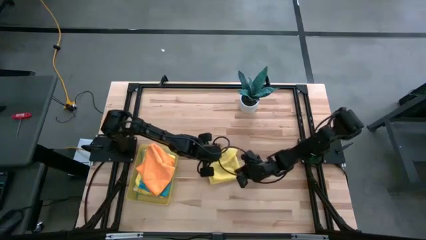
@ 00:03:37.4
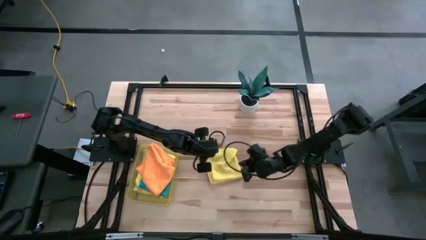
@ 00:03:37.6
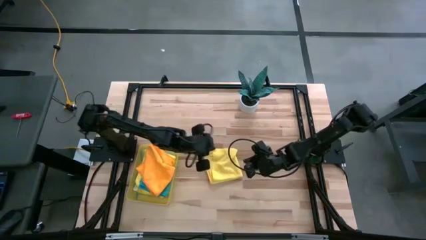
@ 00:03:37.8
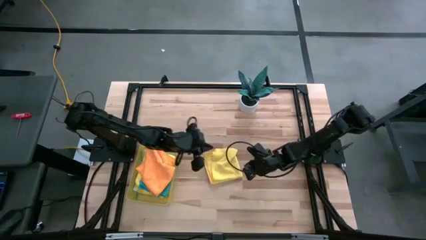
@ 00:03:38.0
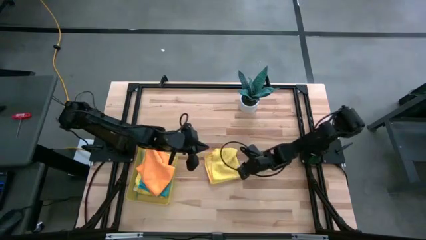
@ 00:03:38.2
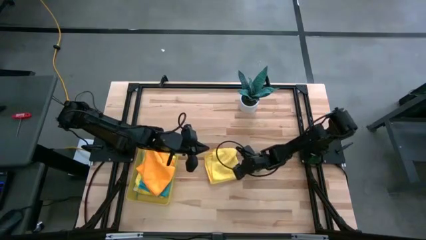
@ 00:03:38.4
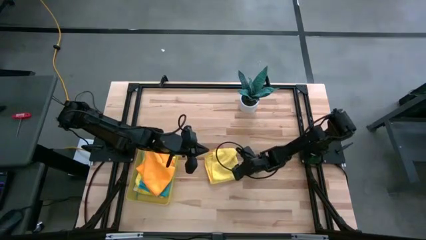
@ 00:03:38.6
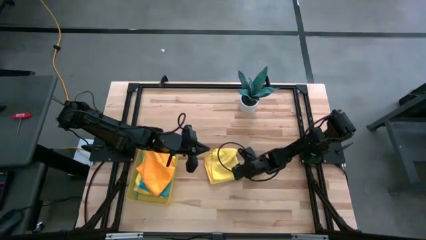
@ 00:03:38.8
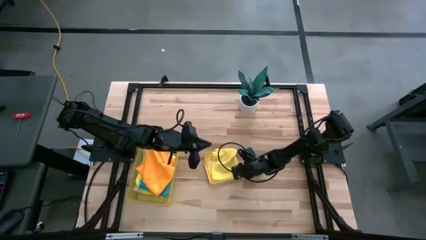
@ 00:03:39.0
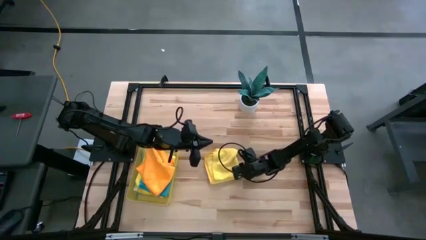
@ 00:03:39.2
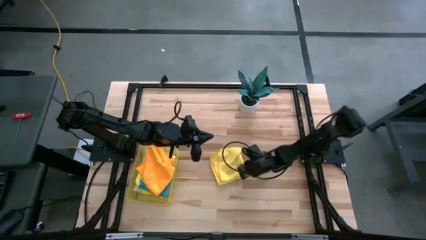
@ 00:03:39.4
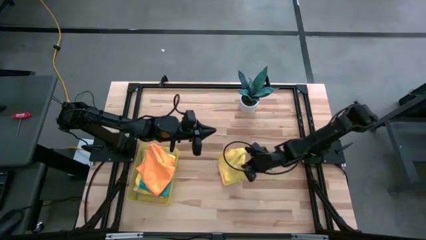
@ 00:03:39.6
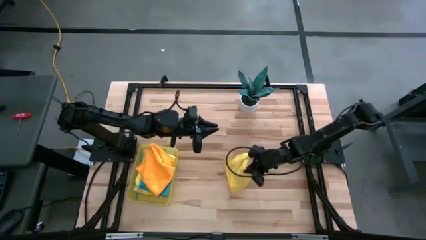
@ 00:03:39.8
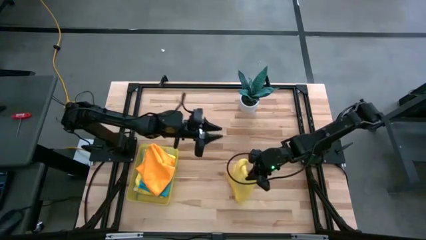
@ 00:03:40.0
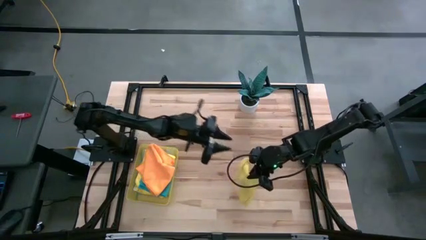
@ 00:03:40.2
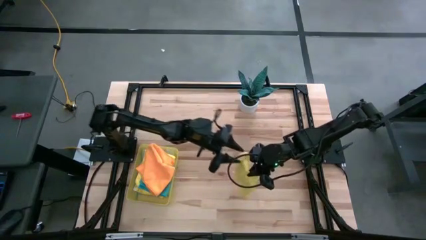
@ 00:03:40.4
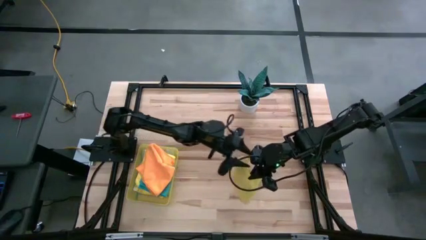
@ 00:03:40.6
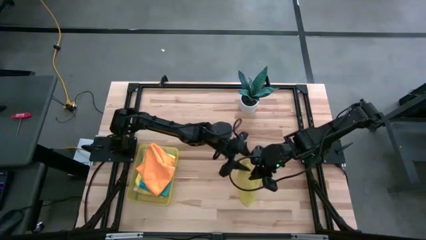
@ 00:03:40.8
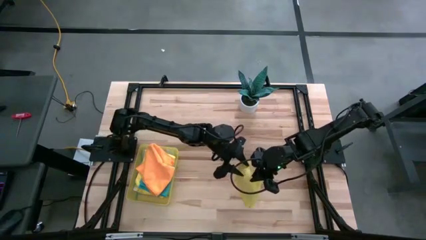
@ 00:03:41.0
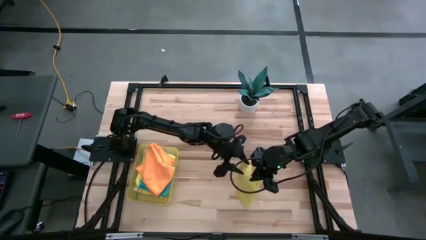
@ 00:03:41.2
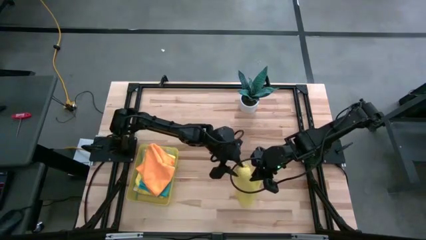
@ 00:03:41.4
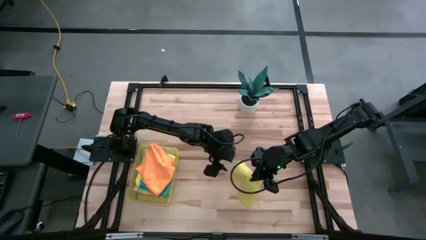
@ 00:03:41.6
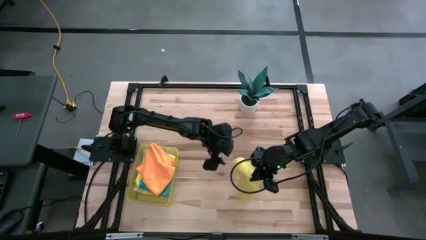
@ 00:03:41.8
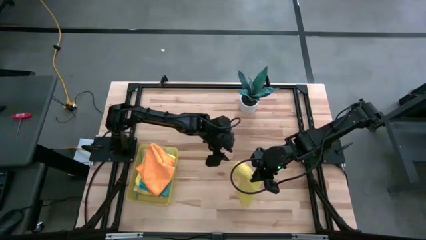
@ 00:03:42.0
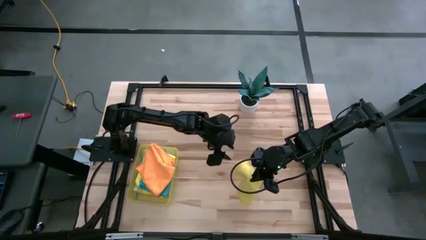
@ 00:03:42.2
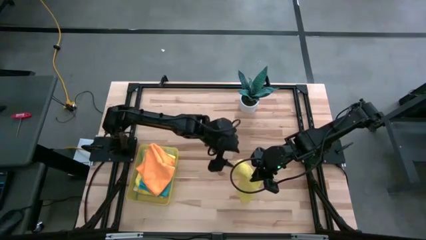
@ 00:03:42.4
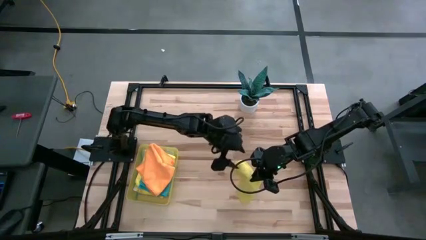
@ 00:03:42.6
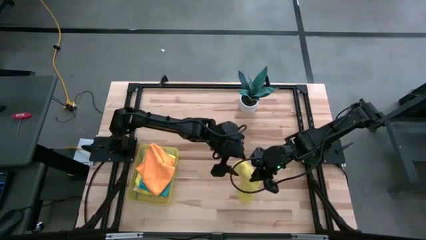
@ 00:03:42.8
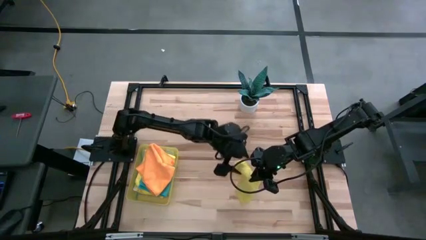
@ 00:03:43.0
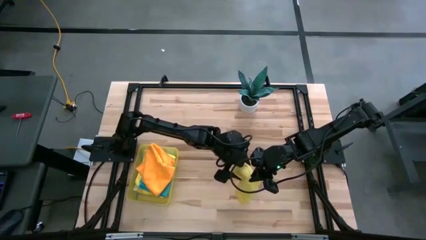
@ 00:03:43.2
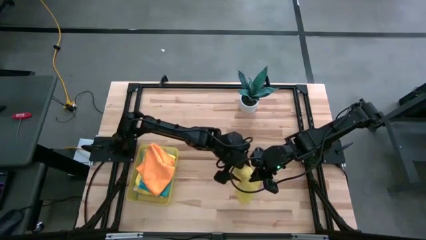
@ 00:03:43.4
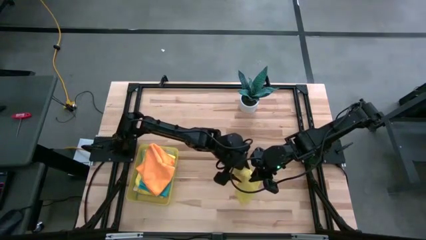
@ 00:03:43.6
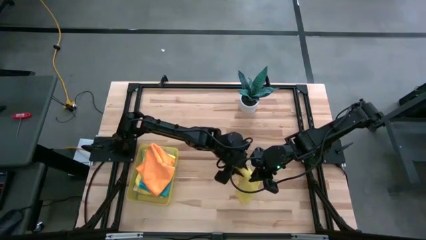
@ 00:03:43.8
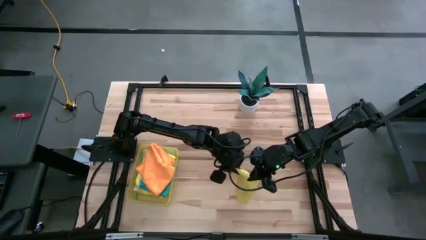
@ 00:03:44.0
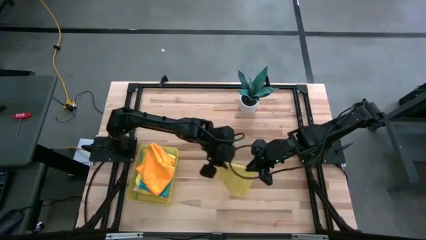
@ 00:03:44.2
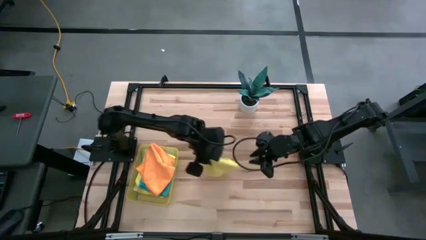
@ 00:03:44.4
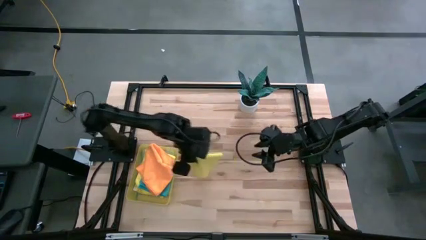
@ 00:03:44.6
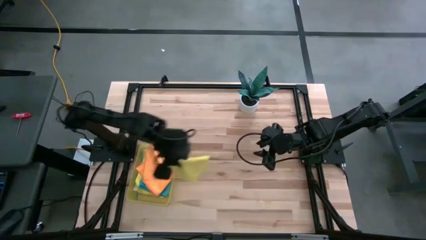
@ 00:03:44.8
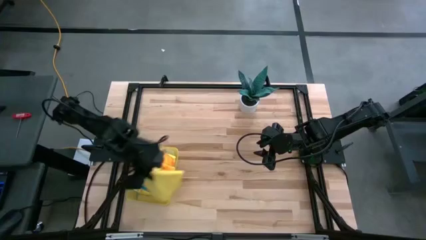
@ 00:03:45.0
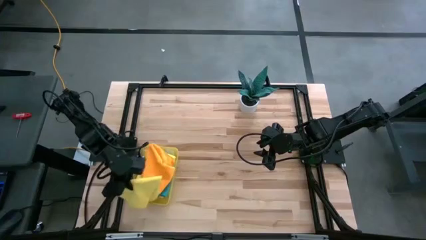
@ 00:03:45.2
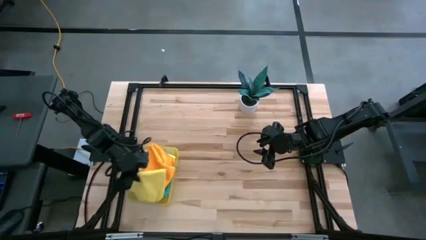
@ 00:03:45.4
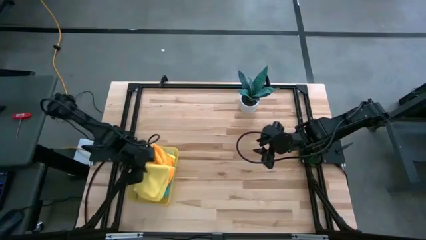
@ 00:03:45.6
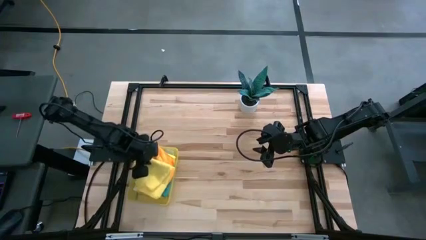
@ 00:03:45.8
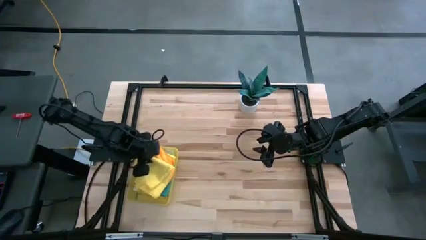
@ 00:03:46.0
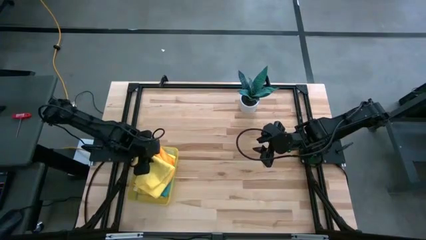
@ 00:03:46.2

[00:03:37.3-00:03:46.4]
Task: Fold microfiber towels
Stack the yellow microfiber cloth on top of the orange microfiber cloth

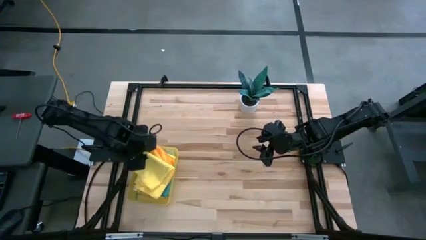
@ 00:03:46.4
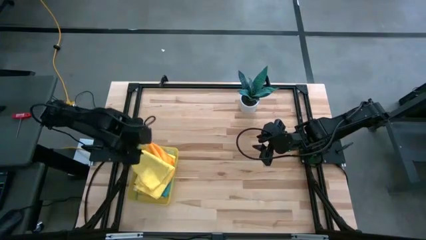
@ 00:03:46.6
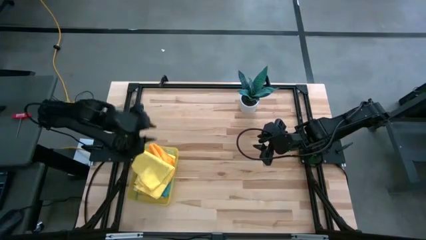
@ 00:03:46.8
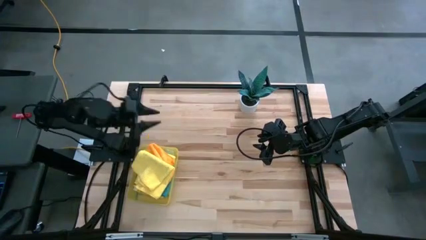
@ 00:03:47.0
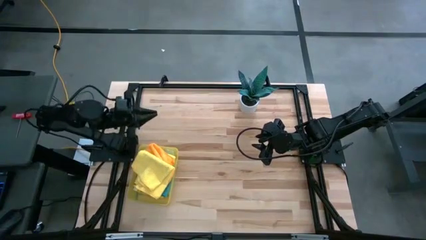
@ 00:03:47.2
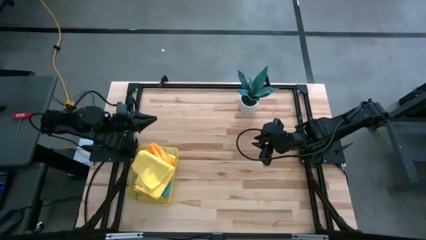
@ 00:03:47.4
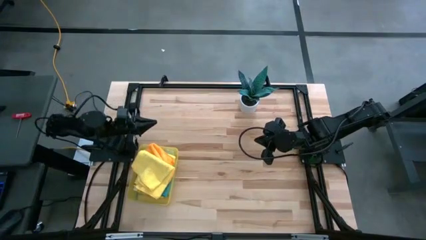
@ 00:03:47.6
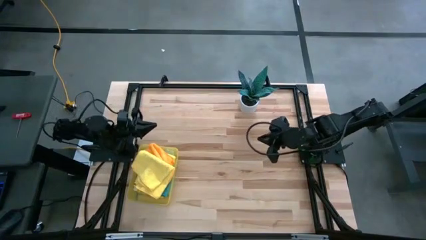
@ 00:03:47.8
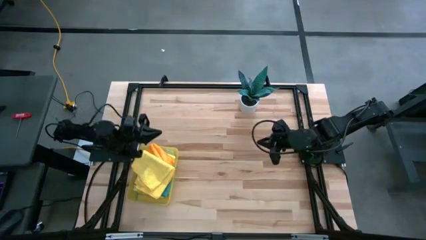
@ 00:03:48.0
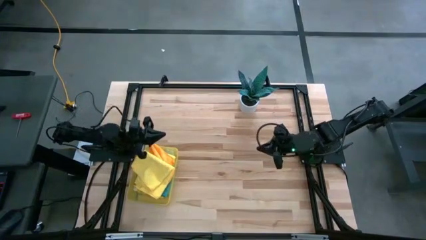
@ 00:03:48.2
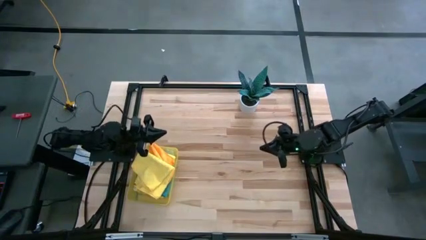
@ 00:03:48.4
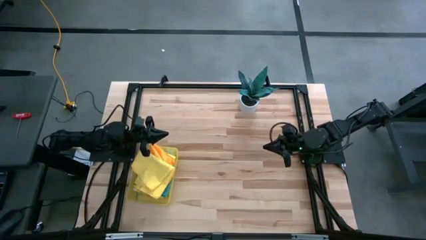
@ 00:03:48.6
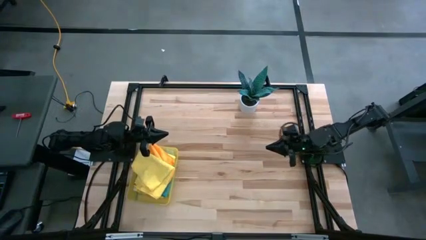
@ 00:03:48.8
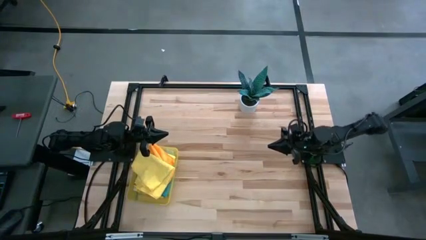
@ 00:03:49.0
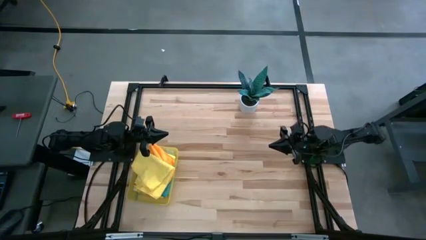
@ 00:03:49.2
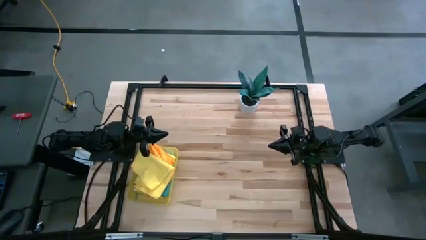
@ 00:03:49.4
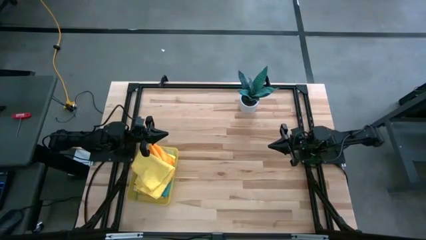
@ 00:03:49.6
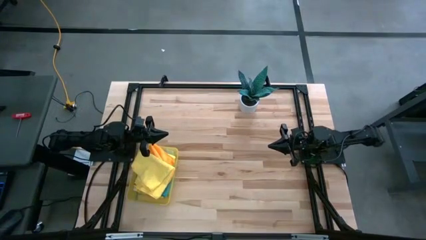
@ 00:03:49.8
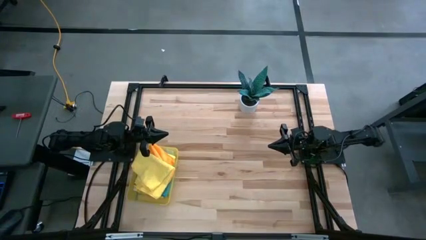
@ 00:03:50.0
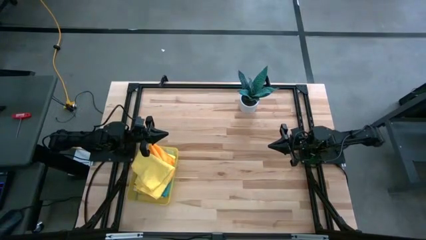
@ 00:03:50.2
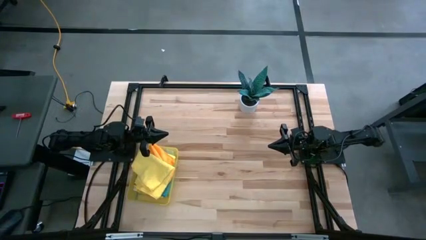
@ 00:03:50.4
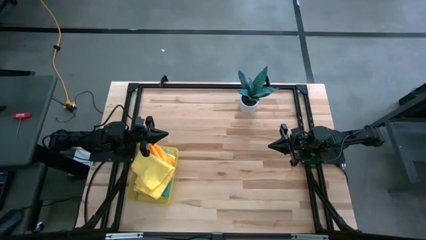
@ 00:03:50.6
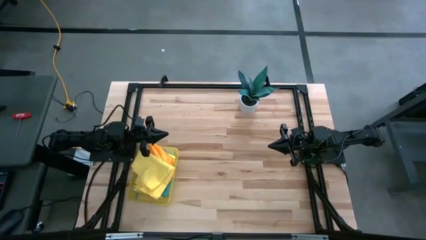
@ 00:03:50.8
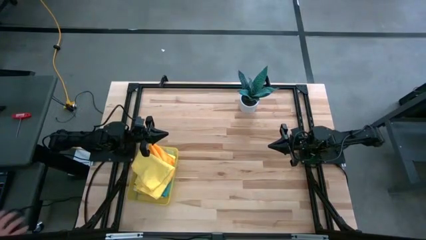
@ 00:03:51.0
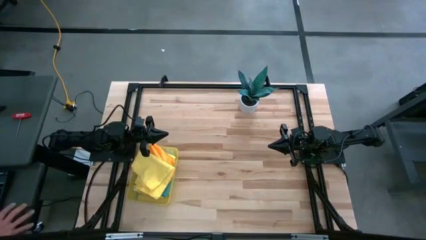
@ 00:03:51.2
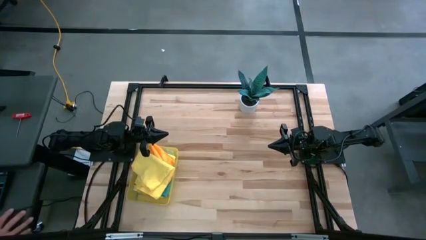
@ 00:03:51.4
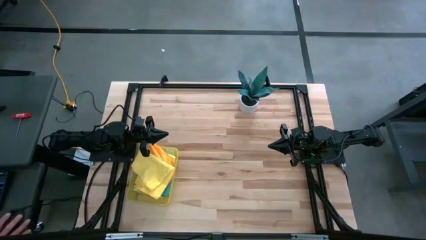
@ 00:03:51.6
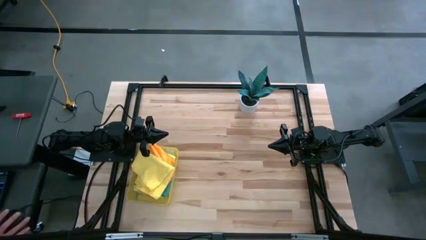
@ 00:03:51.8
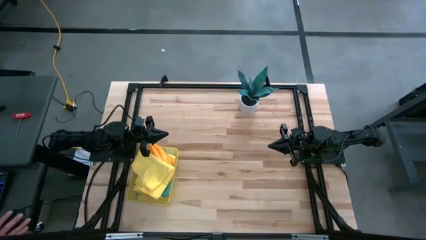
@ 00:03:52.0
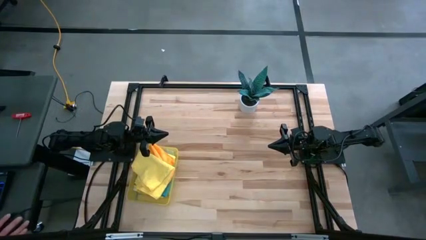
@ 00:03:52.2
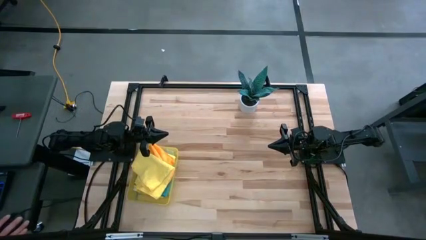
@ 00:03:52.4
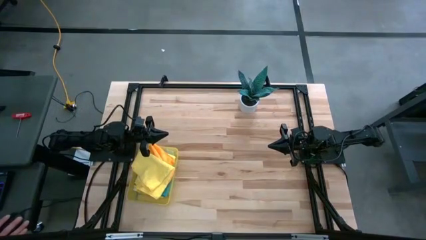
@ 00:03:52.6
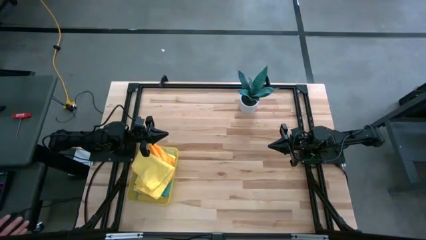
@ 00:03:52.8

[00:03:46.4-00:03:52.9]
Return to Home Position
